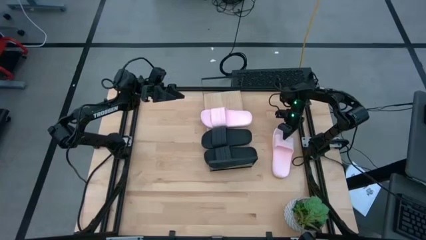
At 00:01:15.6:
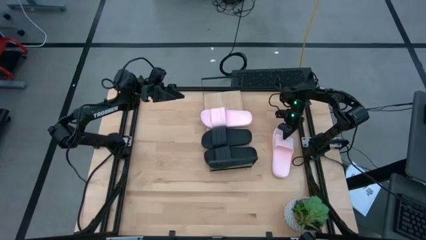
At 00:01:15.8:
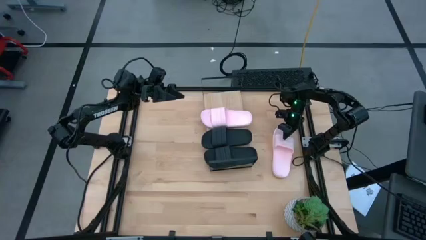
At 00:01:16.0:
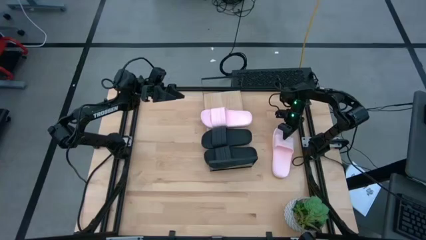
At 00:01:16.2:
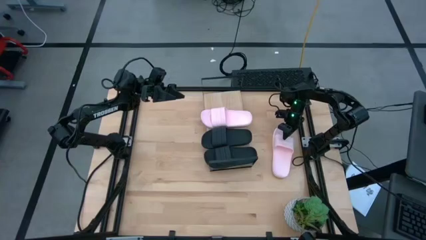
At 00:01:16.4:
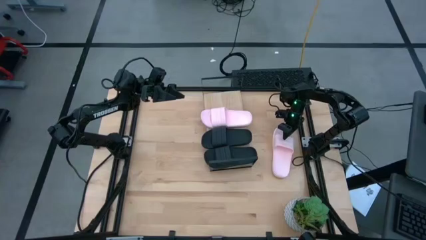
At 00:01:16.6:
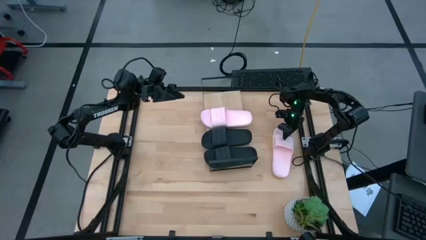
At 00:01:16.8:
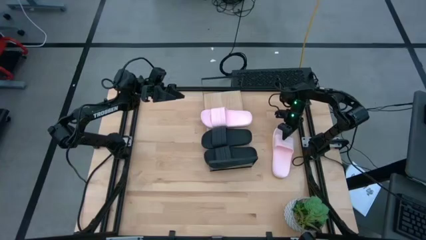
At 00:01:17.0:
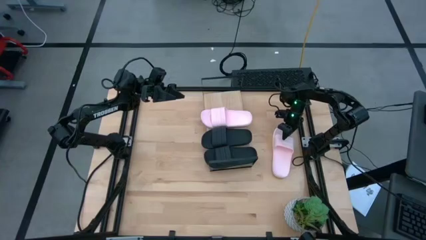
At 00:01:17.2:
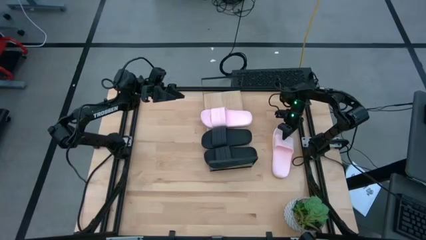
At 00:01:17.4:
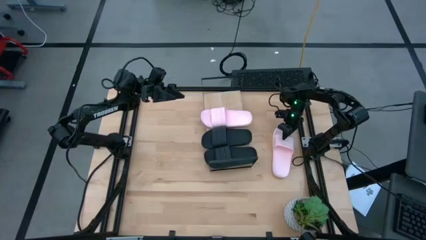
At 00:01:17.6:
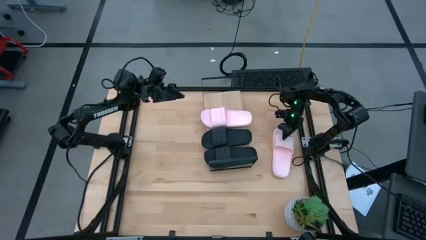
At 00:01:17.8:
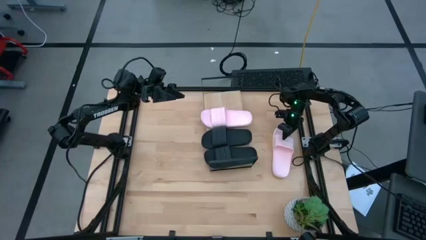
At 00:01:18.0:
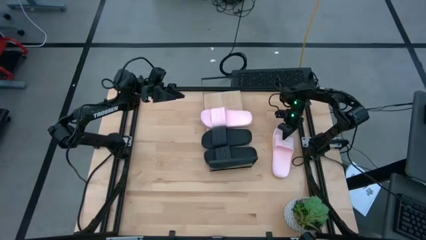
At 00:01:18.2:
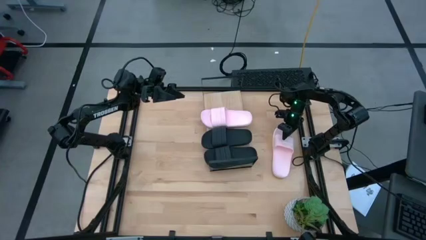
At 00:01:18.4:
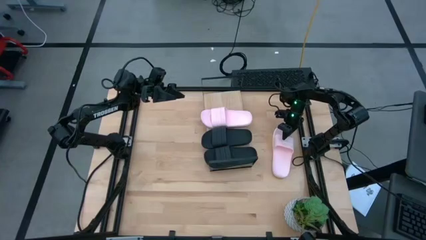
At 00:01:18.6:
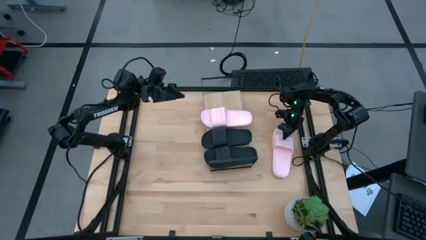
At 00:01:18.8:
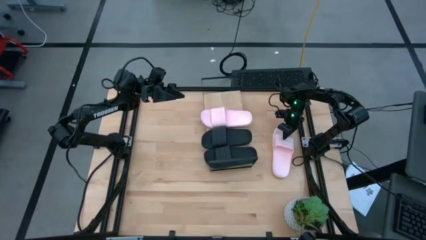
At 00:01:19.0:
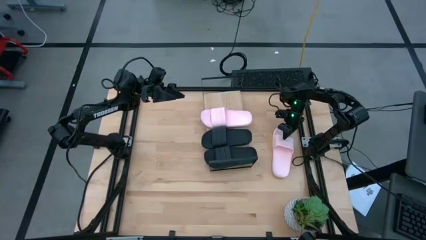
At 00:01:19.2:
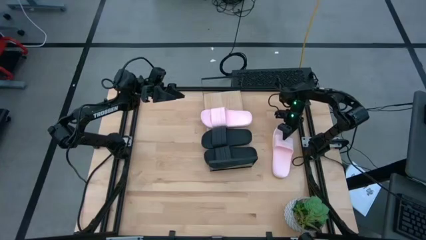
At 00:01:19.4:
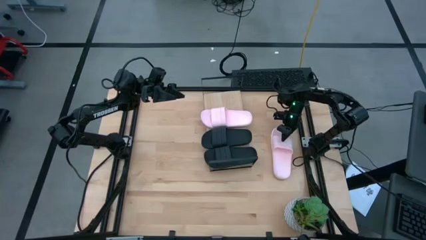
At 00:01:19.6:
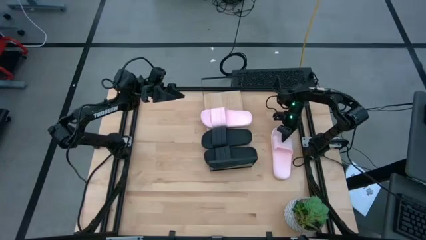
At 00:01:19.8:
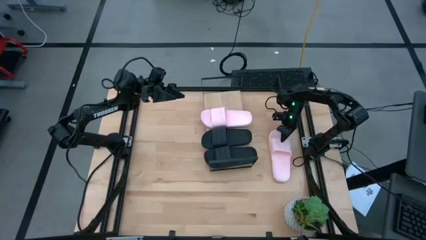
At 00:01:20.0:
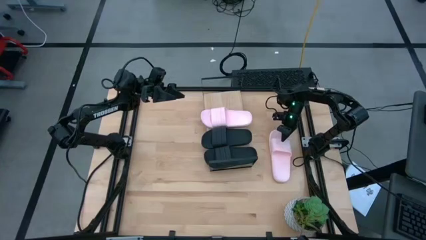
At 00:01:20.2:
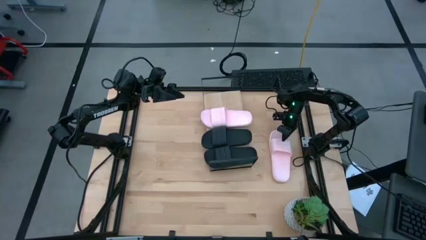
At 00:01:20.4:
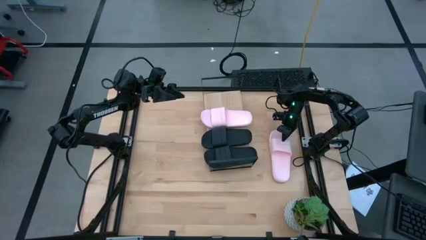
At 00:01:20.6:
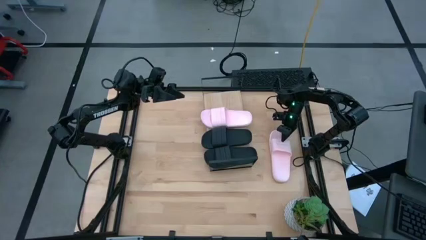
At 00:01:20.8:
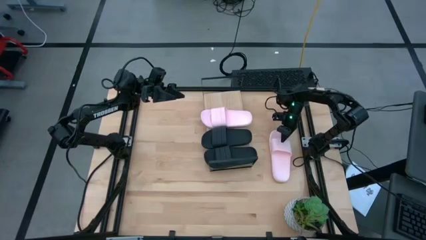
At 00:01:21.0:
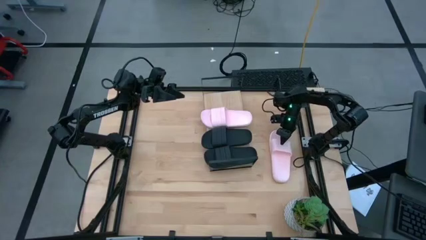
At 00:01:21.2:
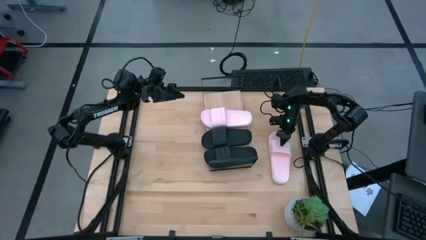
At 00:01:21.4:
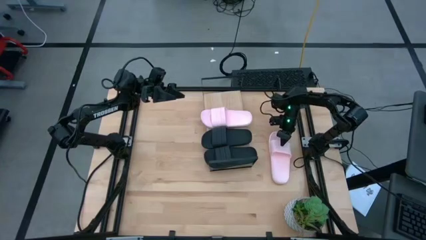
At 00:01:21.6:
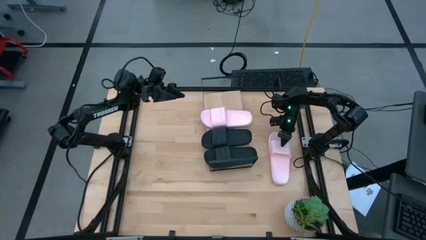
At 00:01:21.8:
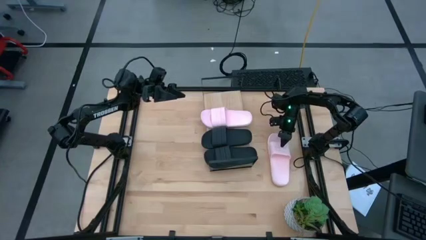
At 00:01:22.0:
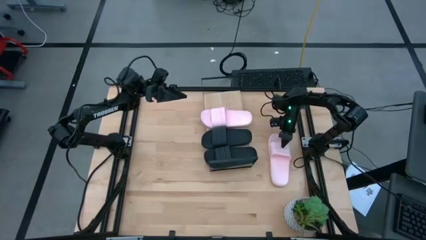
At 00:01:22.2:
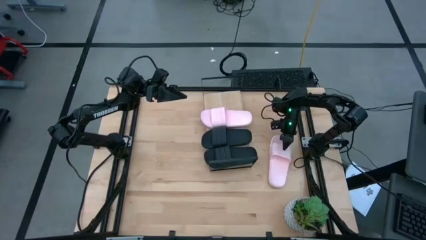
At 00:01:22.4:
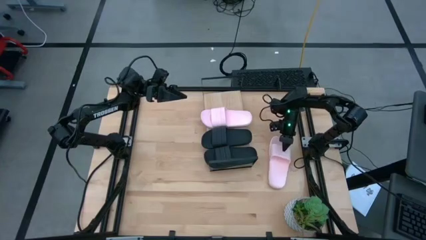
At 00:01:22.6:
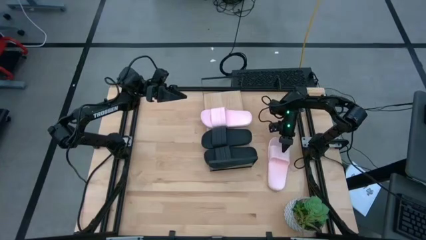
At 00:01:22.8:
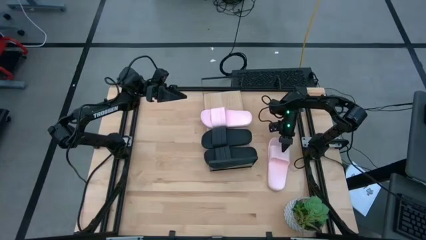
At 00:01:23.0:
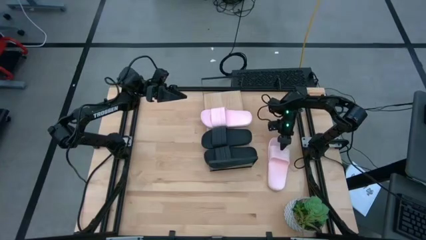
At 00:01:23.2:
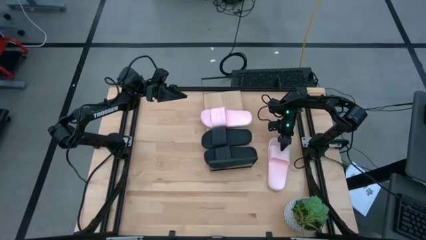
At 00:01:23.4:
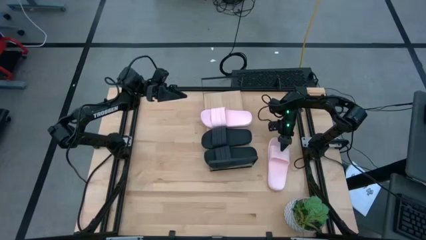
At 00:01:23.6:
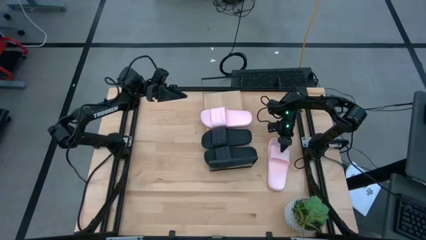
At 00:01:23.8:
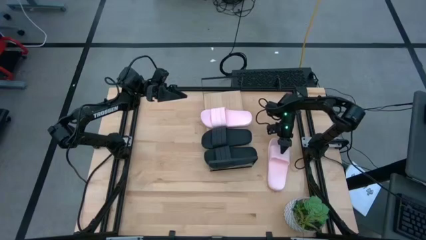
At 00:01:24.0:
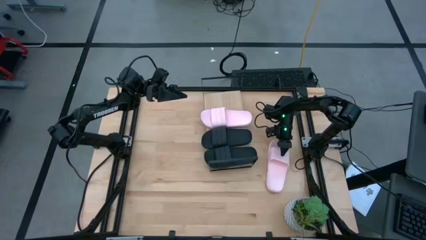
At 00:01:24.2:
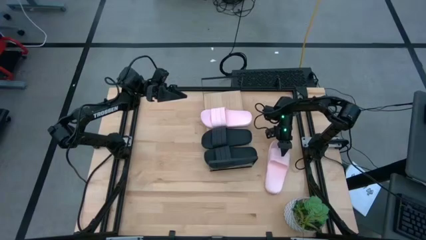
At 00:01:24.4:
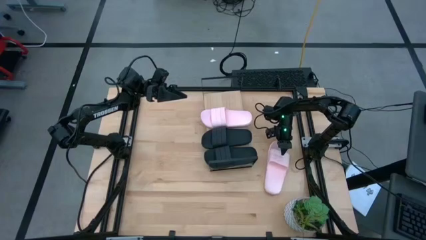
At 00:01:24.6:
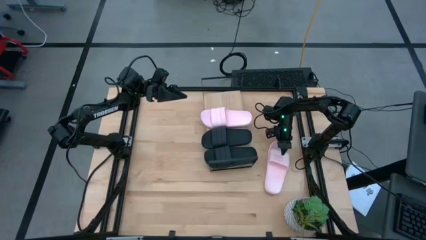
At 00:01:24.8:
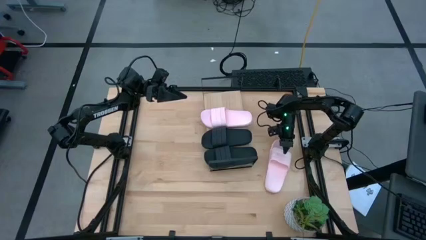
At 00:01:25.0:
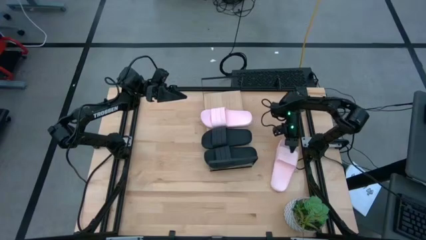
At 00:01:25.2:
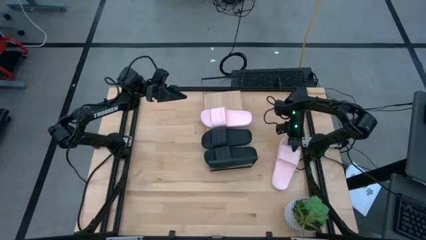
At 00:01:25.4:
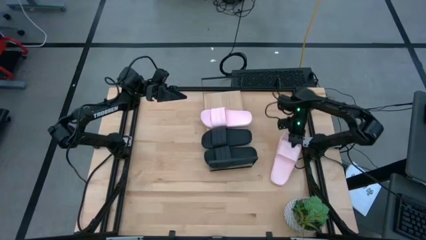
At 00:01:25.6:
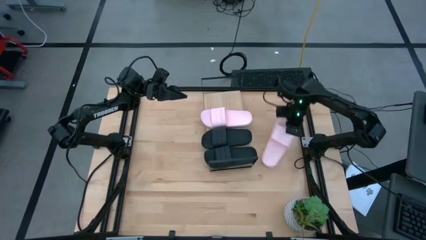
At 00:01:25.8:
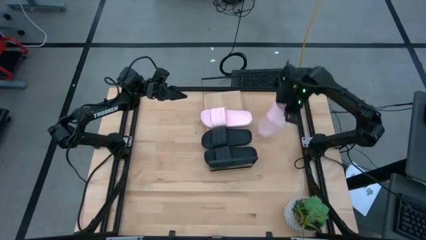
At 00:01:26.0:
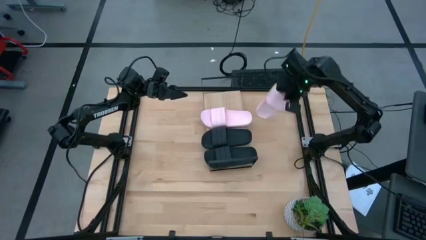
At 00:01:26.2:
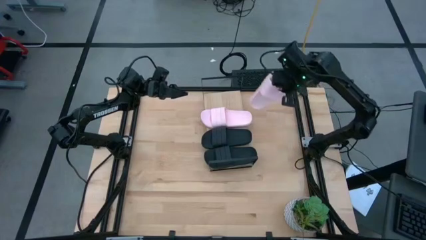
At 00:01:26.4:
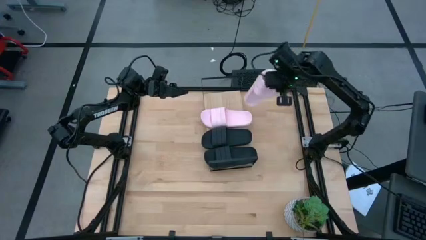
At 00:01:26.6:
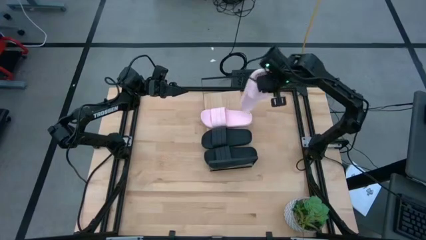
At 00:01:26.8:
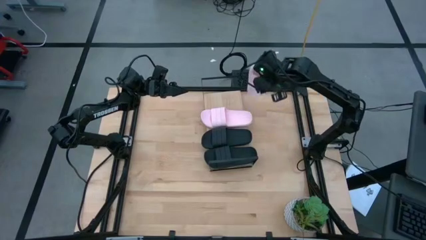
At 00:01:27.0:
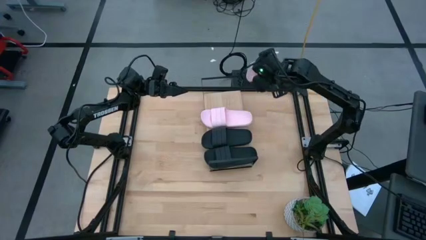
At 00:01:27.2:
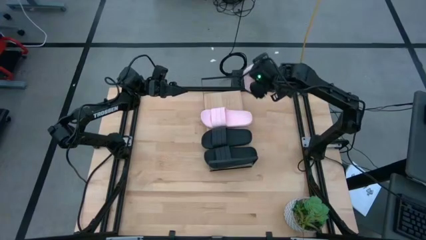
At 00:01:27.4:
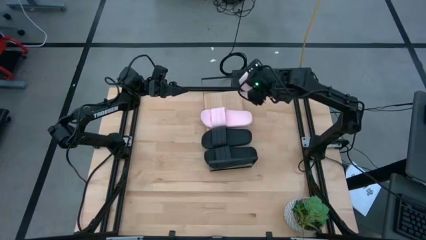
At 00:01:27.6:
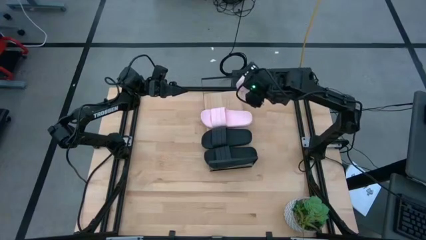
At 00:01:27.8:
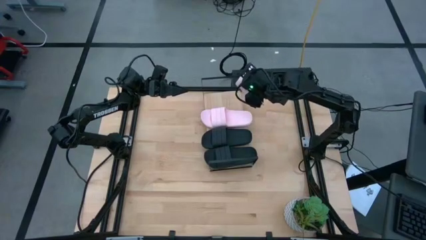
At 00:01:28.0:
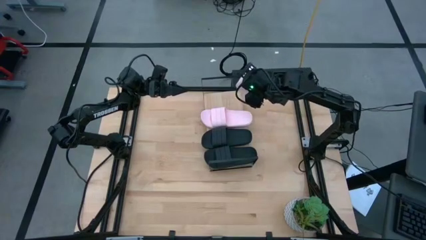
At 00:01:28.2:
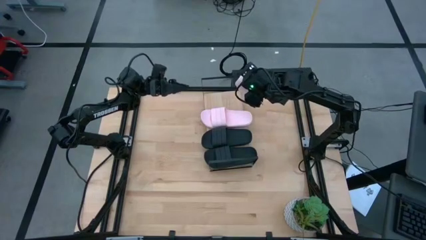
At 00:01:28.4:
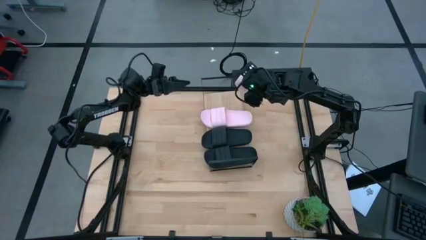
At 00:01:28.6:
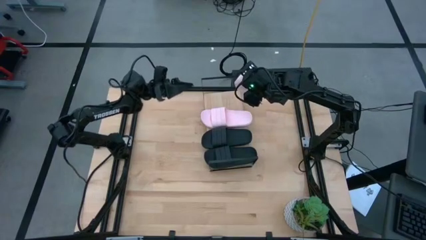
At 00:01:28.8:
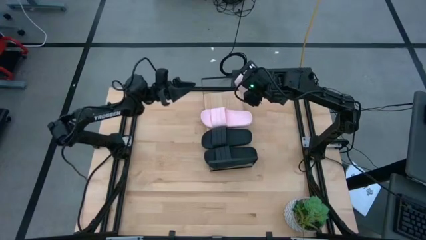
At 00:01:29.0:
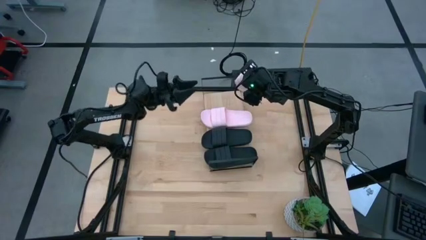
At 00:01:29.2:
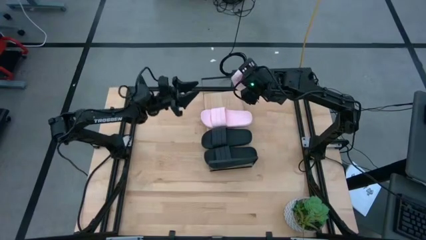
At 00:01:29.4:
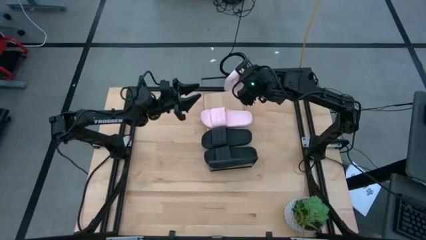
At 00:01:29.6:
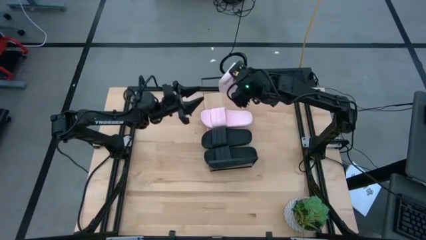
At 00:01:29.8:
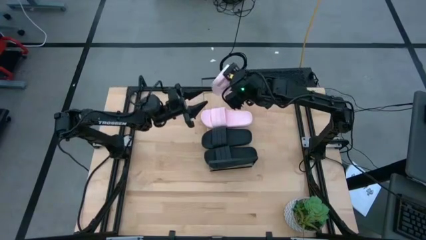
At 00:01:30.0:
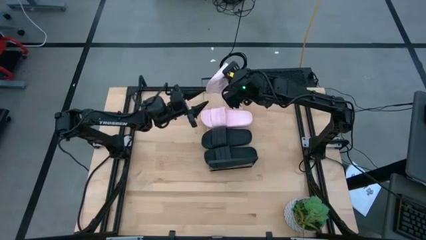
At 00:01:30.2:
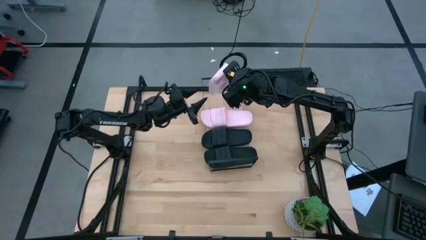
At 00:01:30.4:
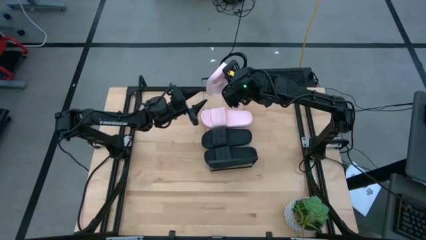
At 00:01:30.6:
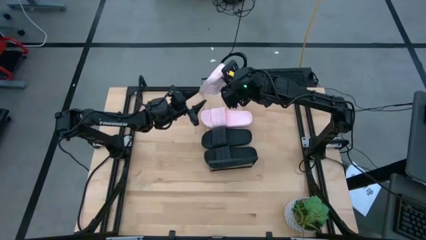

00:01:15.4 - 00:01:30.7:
Task: Pick and place slides into the shelf
Put the pink slide on the shelf
